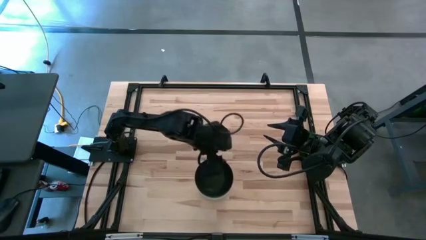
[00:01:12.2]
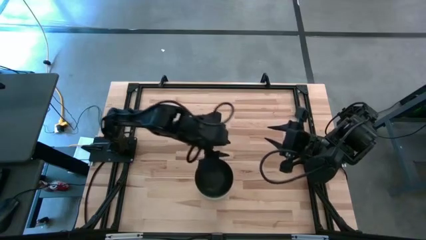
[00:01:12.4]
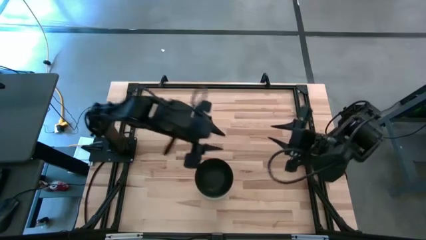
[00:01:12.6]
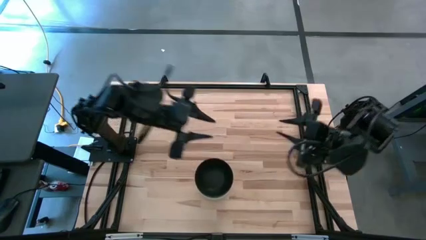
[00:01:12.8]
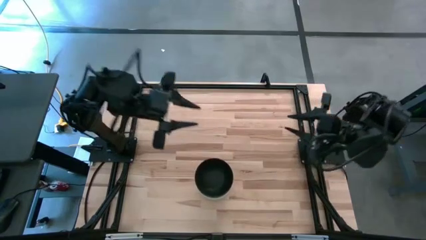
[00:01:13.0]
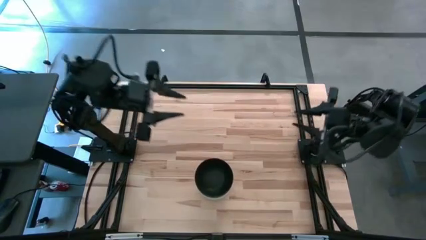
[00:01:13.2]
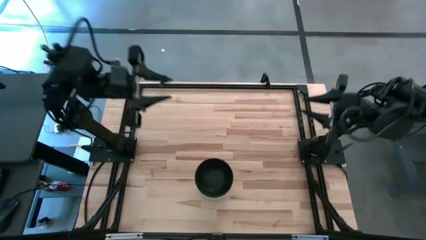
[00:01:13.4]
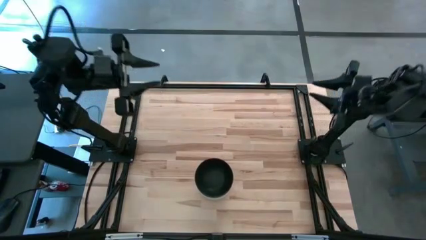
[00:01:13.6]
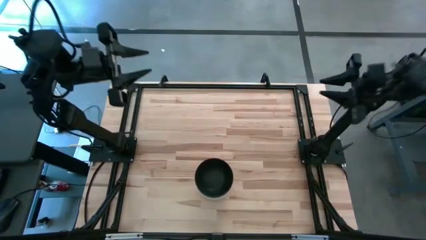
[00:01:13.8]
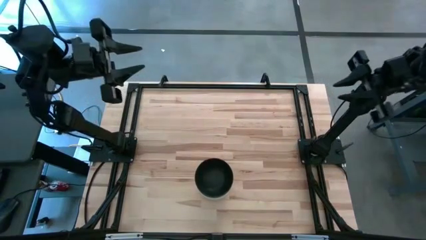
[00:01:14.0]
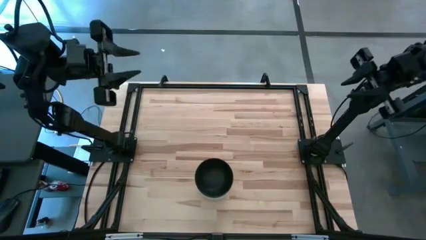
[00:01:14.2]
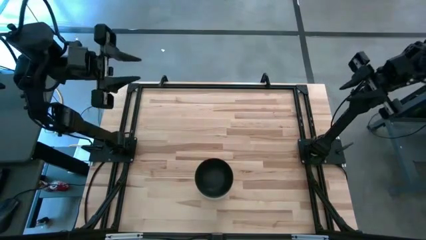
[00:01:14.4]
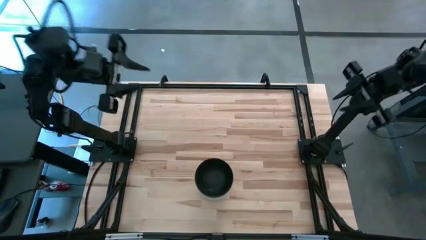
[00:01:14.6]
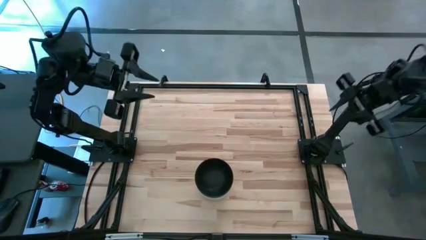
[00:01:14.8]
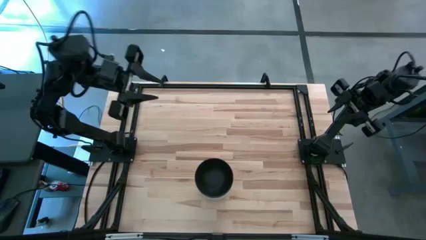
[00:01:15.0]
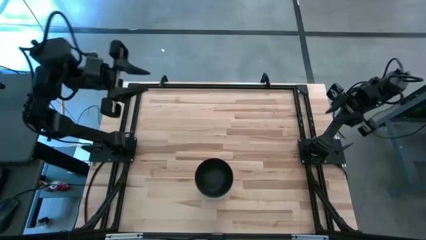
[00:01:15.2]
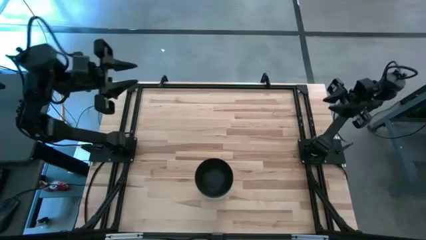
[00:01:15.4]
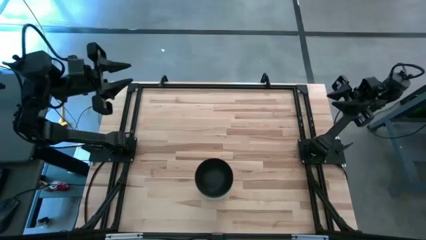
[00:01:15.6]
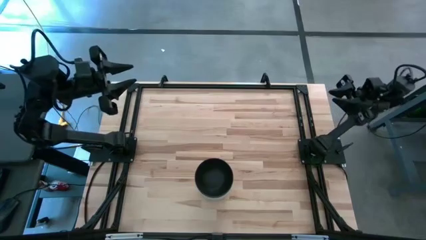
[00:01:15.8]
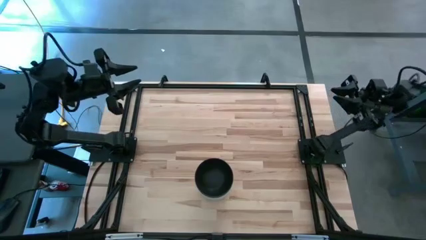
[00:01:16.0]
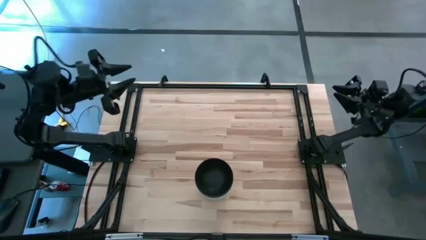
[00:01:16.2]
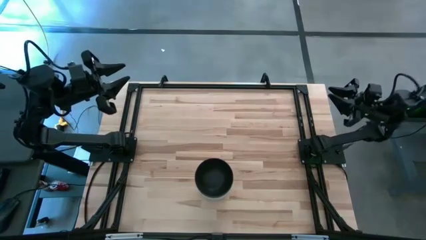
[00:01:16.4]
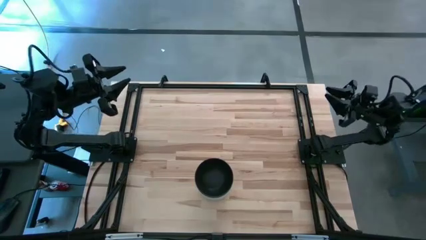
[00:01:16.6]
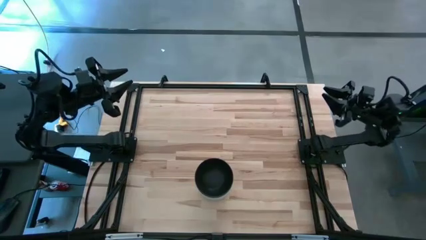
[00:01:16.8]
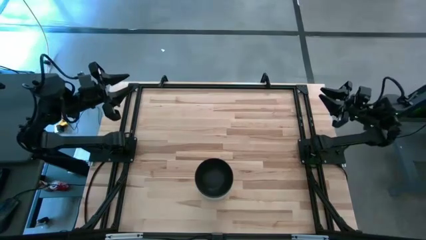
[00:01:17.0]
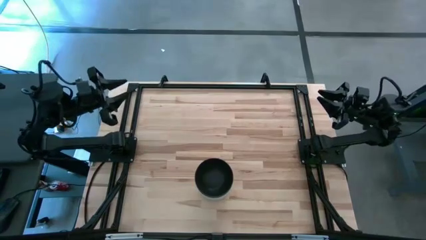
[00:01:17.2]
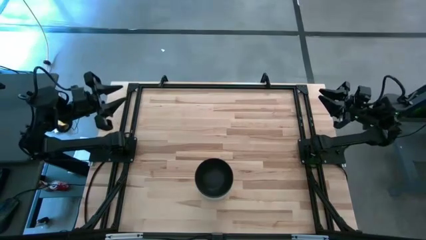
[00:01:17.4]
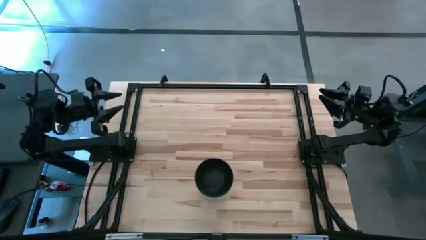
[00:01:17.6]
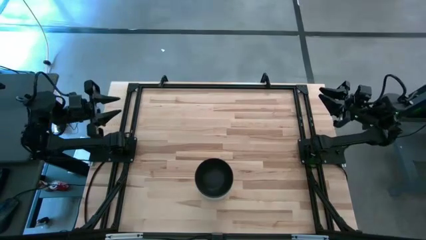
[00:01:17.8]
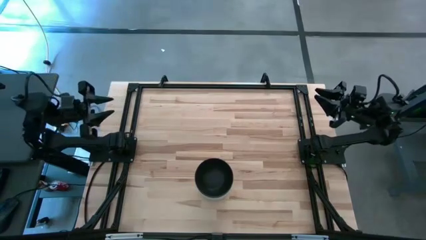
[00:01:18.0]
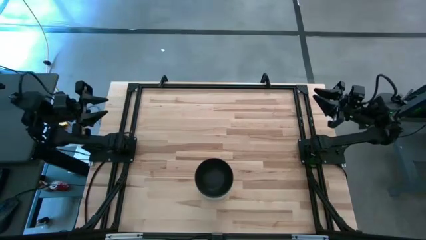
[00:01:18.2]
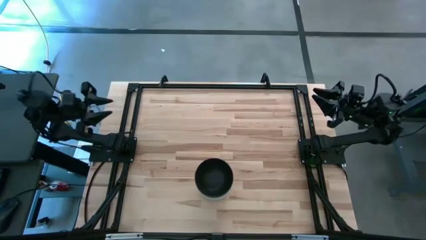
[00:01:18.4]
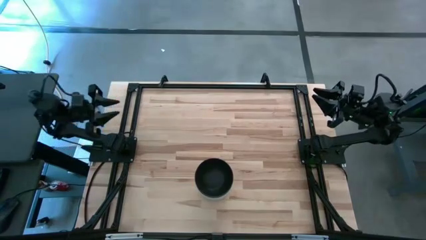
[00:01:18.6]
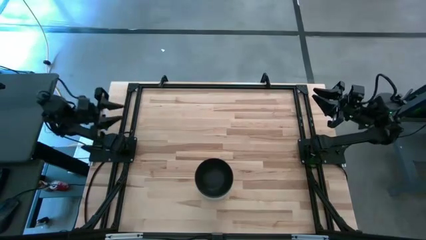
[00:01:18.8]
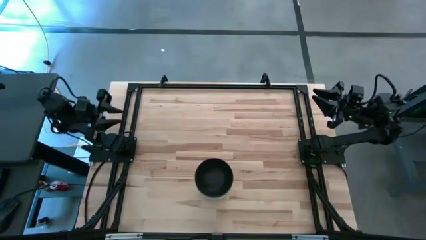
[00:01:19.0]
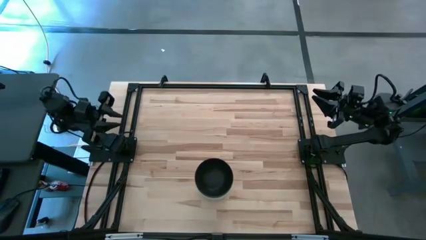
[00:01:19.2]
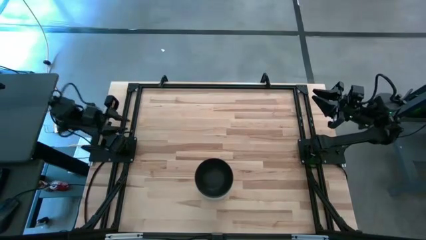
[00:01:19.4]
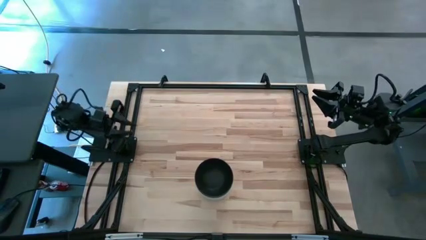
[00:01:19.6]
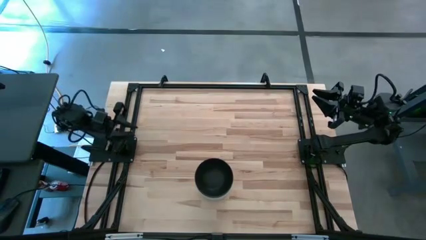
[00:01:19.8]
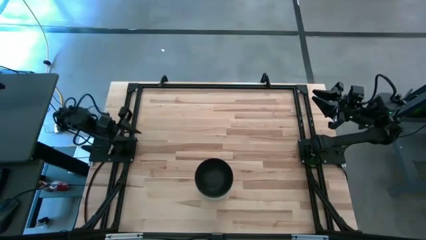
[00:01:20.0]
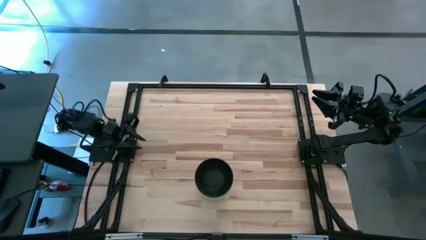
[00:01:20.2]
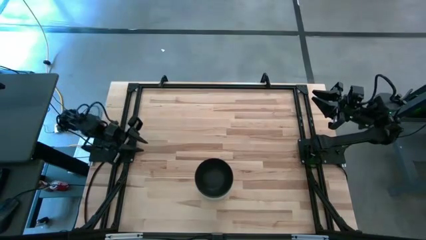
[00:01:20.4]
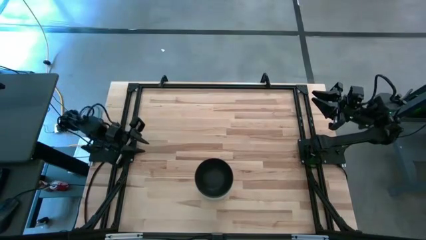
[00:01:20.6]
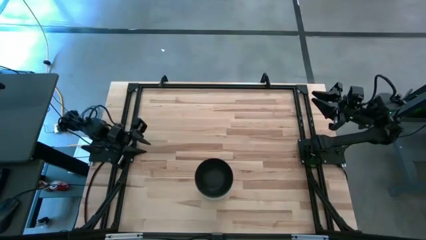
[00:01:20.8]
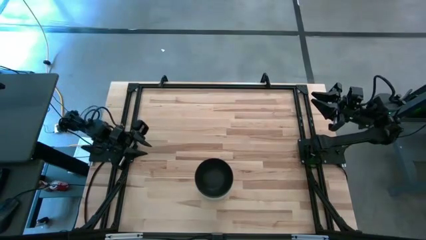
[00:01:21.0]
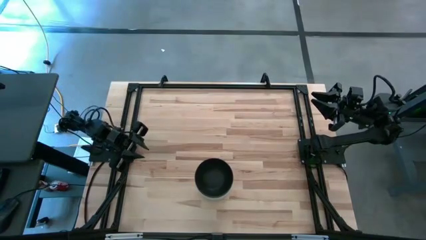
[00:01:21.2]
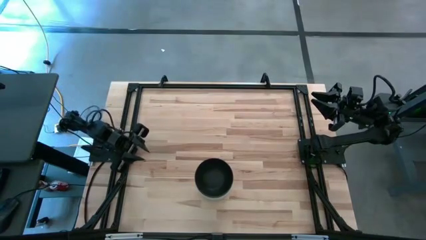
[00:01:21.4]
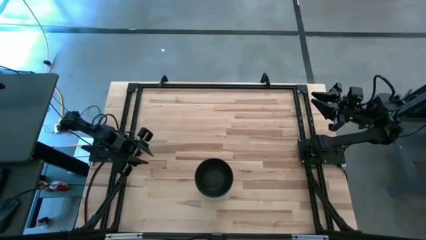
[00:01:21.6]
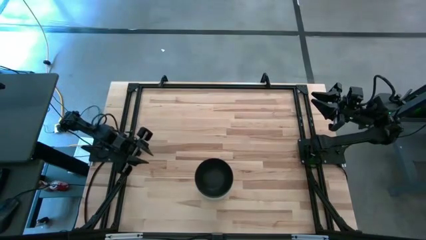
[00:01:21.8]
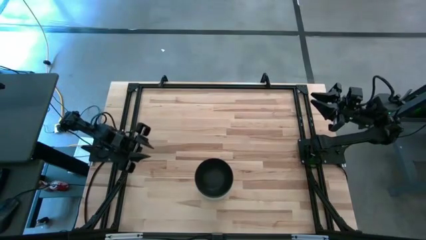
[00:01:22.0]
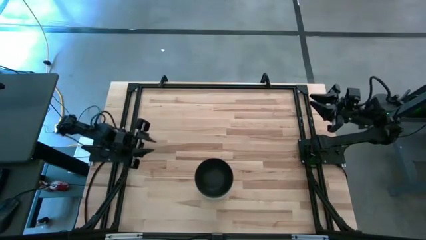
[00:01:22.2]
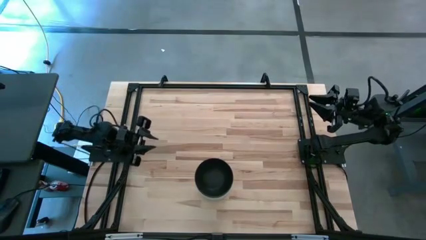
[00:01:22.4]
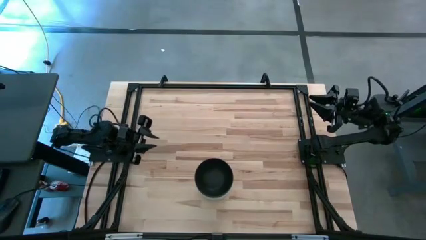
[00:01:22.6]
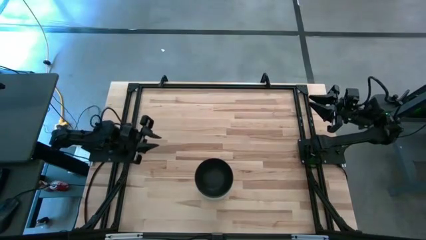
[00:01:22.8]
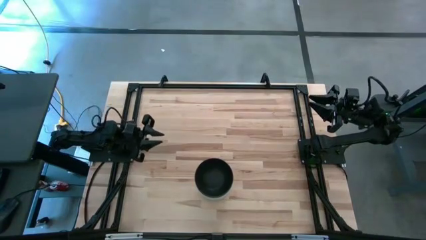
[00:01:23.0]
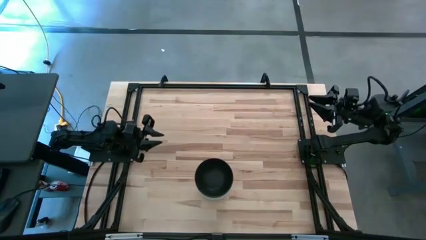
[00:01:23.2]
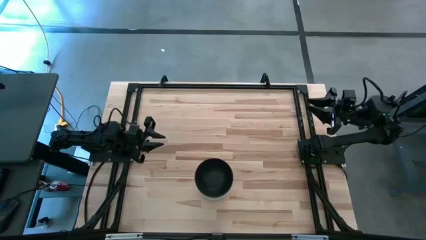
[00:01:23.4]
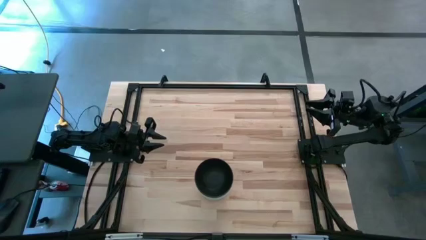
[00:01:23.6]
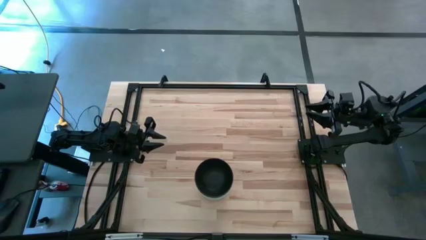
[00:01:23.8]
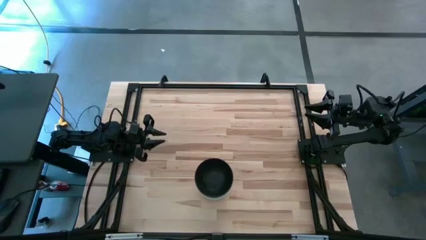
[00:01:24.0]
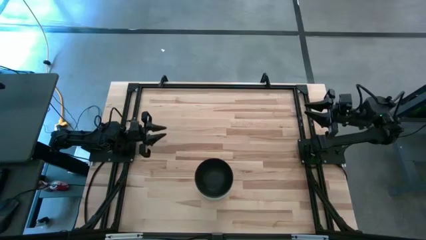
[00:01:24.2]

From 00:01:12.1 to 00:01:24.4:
Task: Nest bowls inside each other
Return to Home Position
